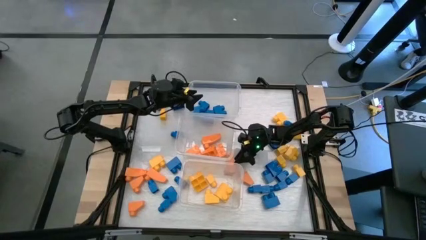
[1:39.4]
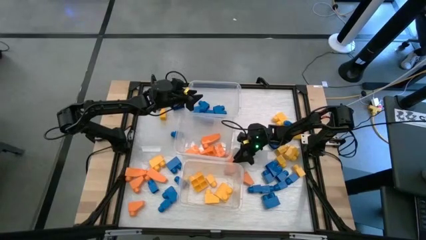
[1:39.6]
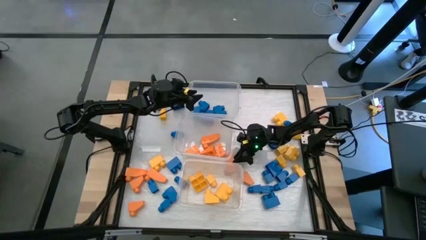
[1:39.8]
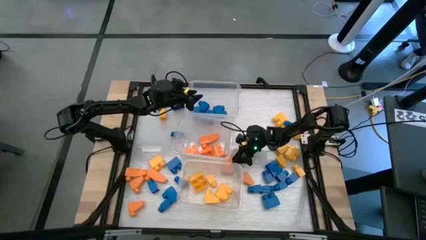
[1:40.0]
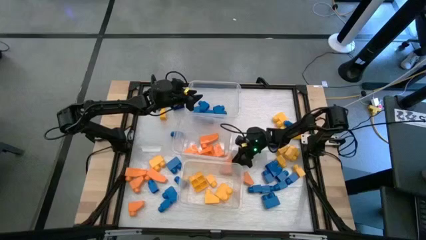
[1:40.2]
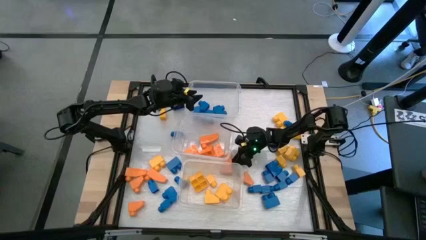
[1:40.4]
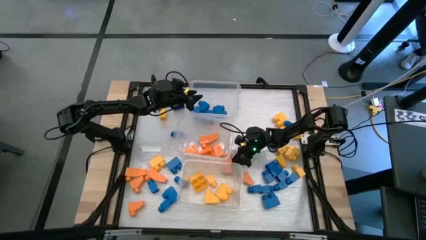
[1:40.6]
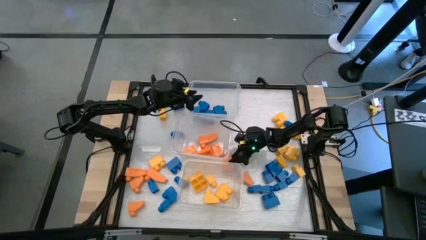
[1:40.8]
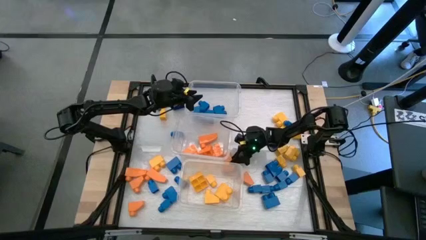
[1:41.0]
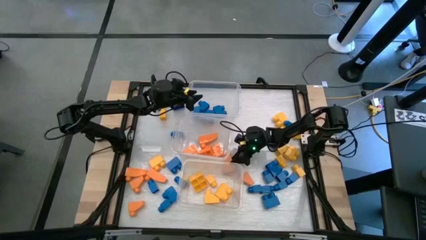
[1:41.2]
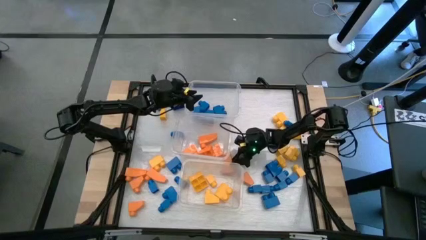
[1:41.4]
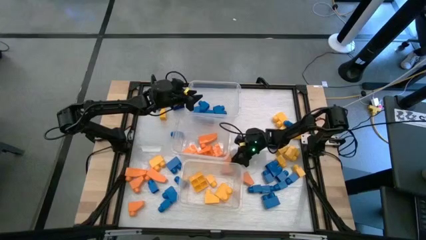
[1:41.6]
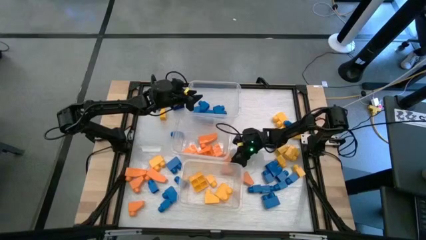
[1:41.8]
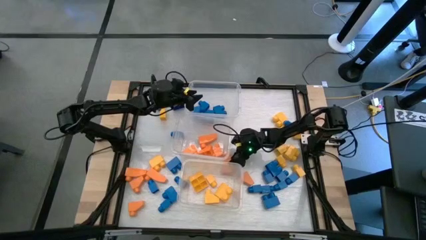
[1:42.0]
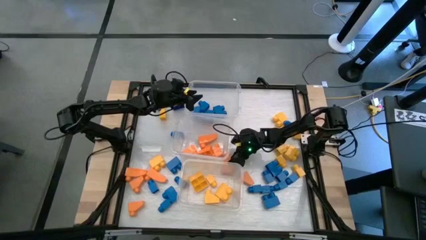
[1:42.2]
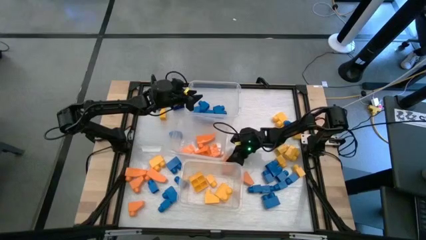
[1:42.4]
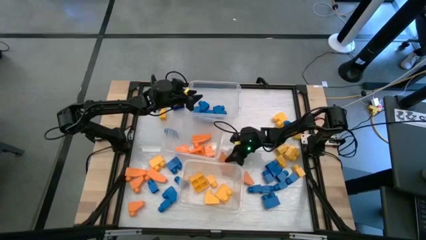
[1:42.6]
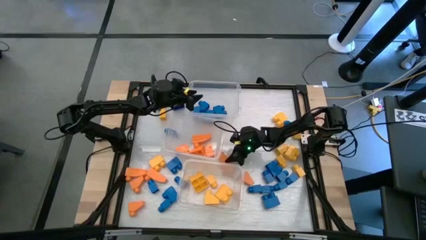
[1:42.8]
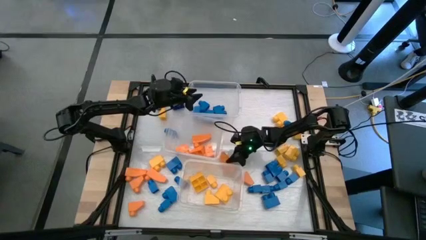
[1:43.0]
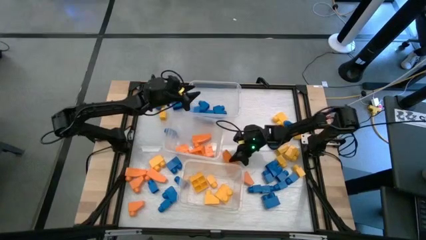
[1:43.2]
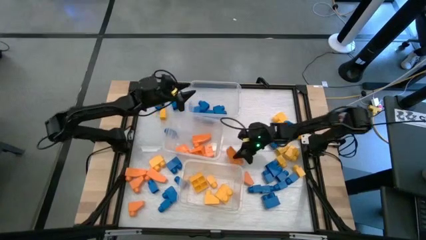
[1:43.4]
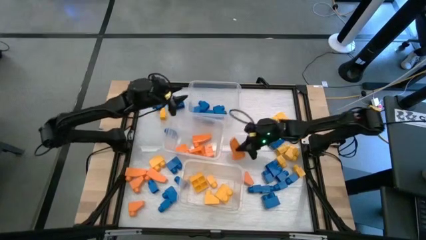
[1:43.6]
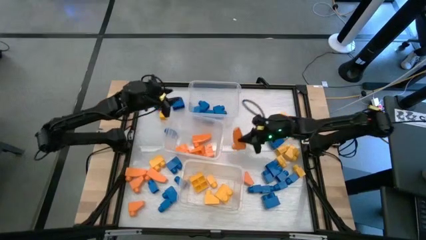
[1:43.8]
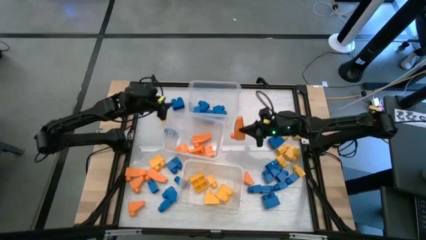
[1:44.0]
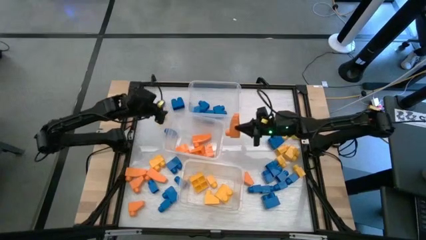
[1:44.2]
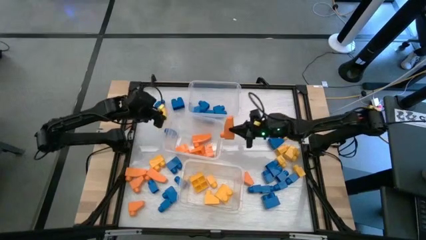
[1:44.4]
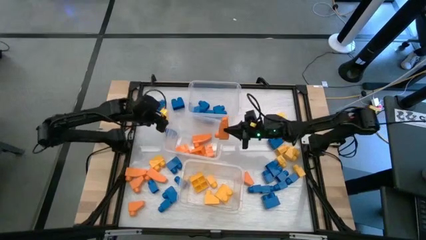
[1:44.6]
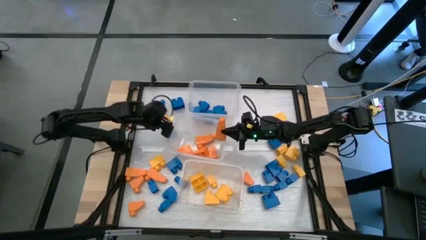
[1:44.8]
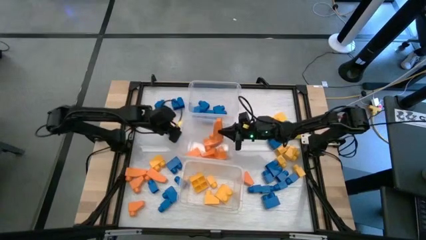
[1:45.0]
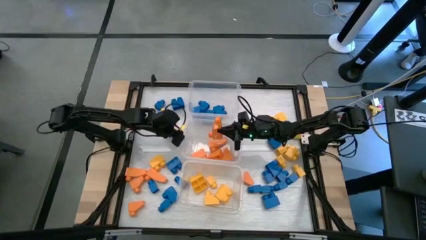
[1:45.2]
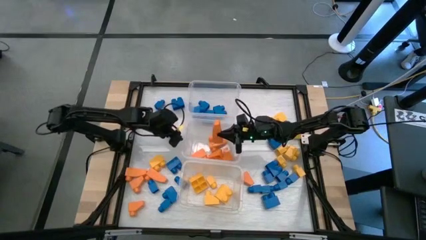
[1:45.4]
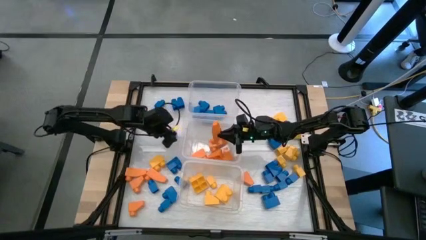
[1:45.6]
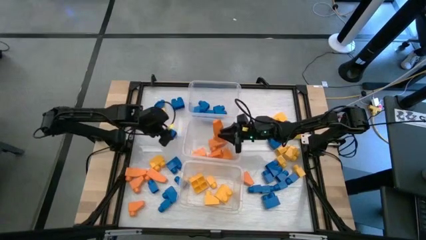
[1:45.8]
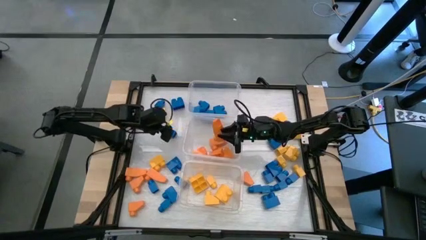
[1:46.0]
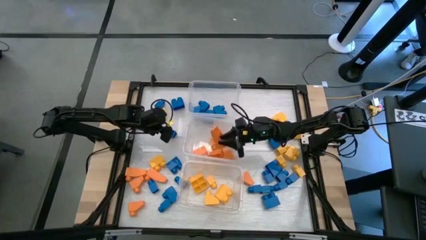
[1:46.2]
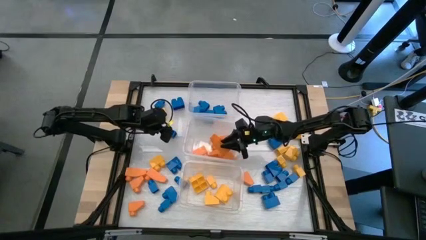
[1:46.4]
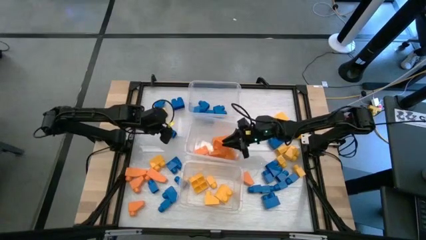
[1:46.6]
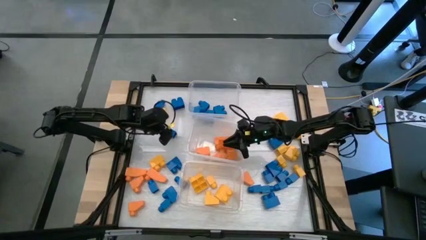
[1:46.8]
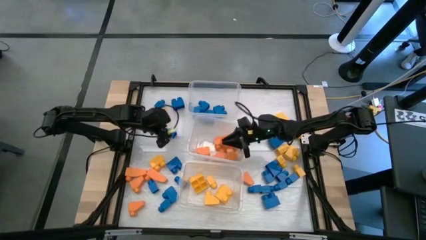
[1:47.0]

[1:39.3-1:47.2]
Task: Sort blocks
Put the orange game piece into the middle transparent bin

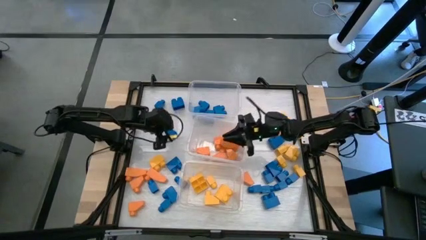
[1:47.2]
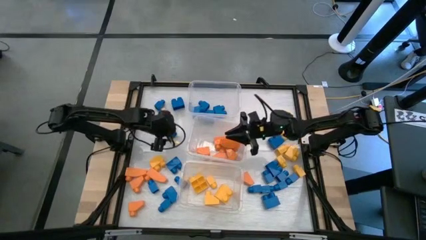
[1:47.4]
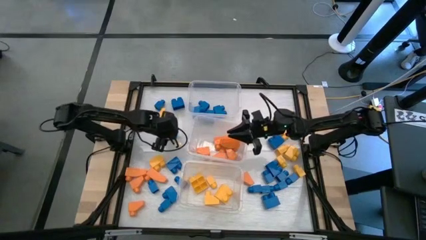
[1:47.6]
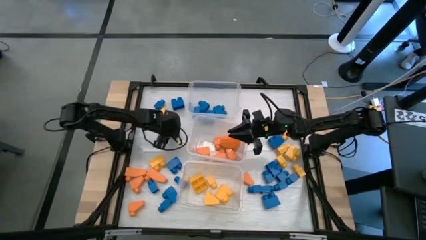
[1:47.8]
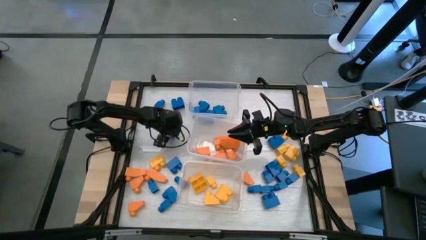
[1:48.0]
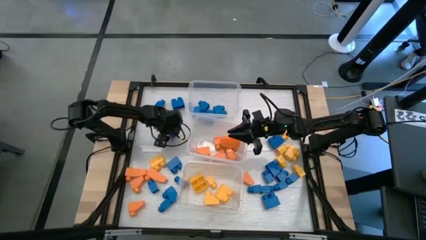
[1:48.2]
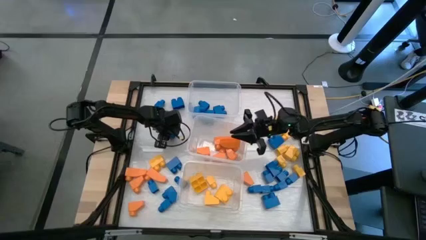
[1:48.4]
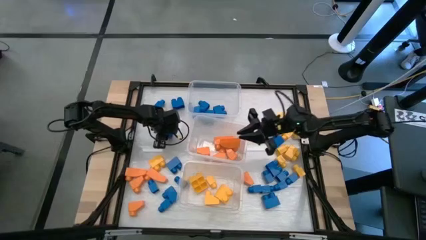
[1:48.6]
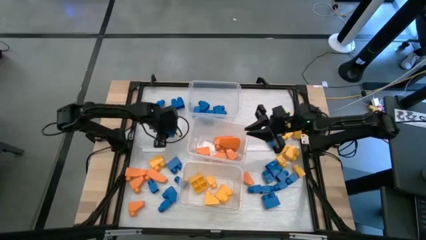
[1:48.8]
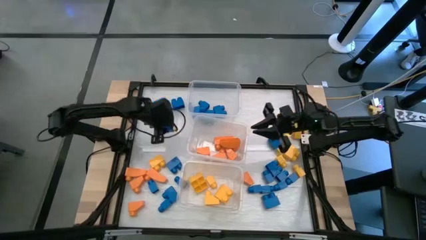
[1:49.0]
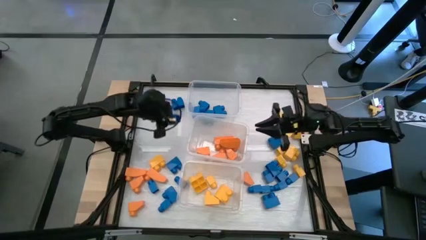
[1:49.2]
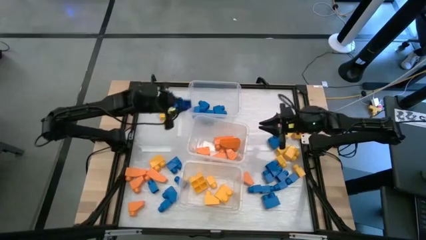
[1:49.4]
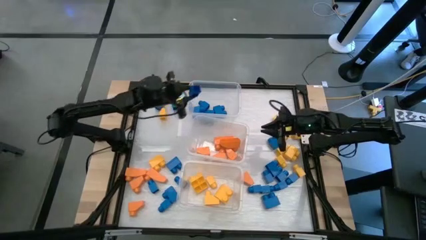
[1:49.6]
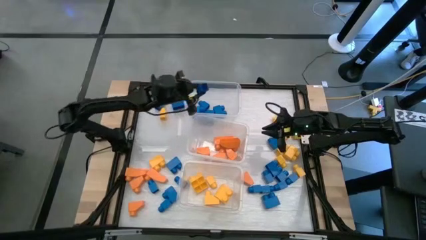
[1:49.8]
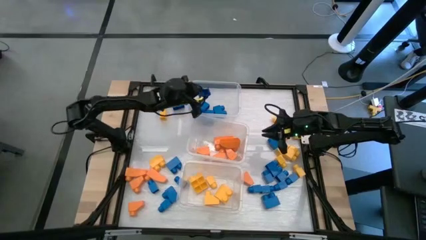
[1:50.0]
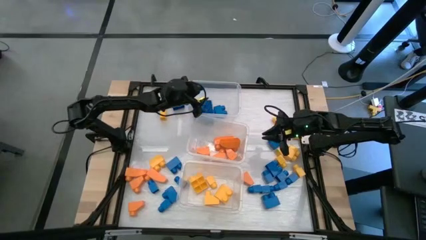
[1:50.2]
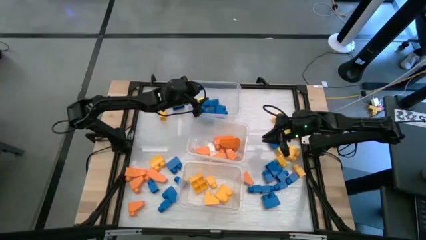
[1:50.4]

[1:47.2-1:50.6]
Put the blue game piece into the top transparent bin

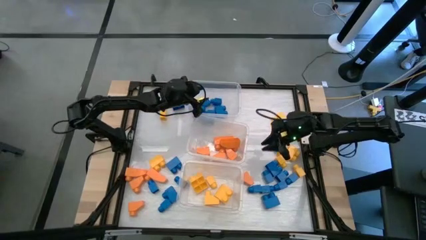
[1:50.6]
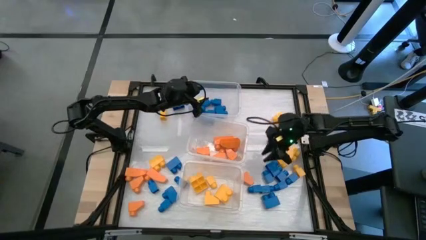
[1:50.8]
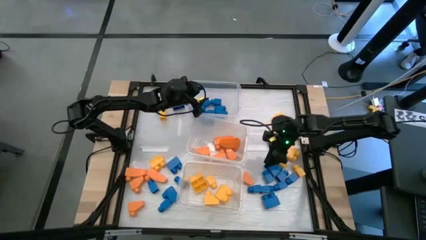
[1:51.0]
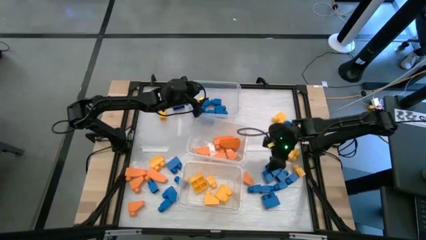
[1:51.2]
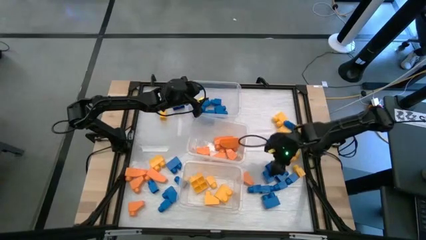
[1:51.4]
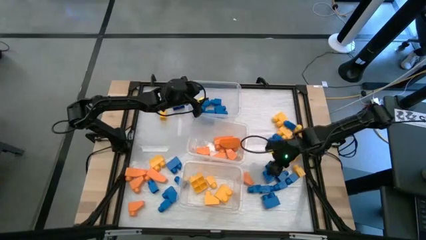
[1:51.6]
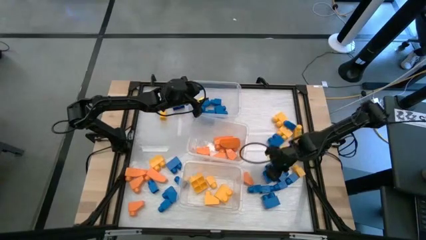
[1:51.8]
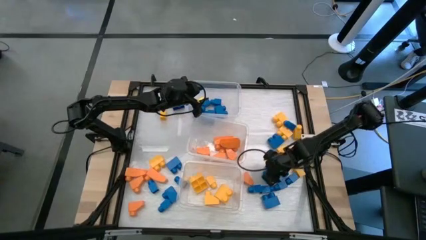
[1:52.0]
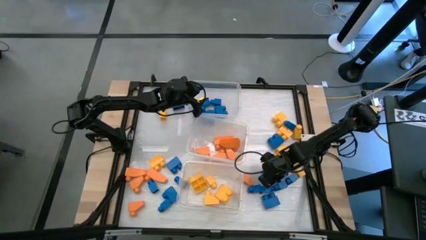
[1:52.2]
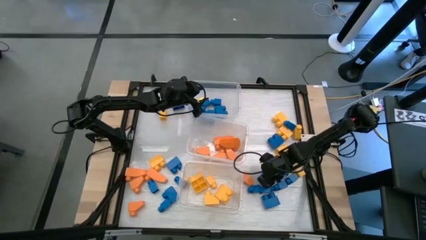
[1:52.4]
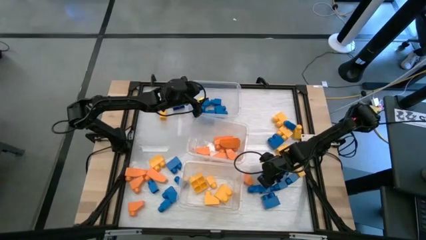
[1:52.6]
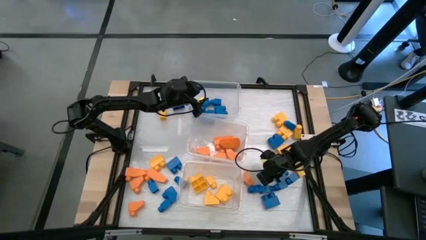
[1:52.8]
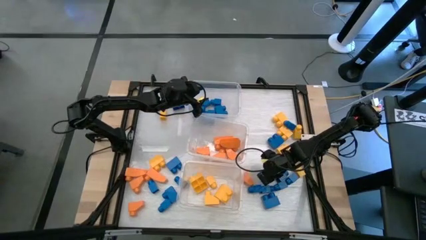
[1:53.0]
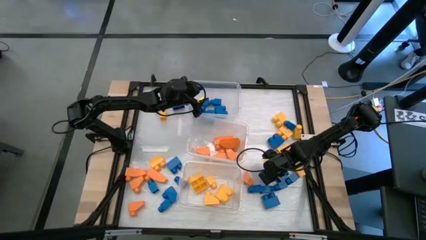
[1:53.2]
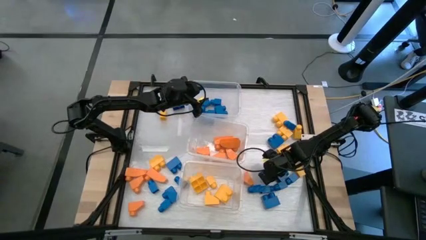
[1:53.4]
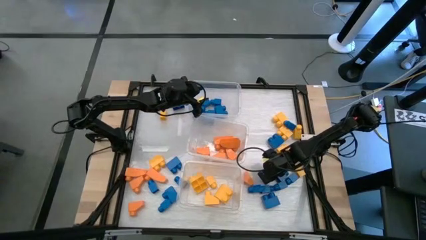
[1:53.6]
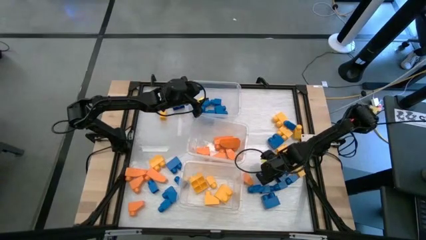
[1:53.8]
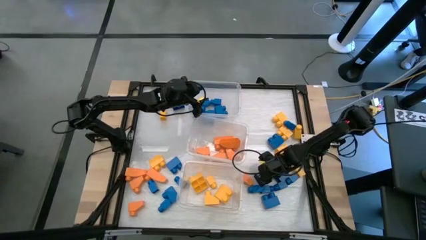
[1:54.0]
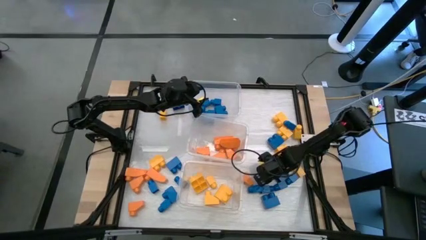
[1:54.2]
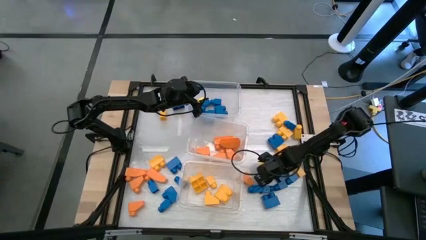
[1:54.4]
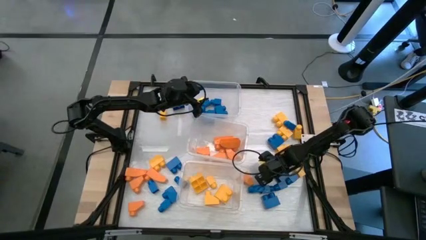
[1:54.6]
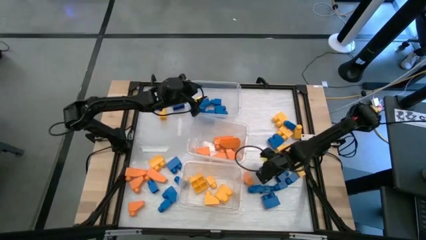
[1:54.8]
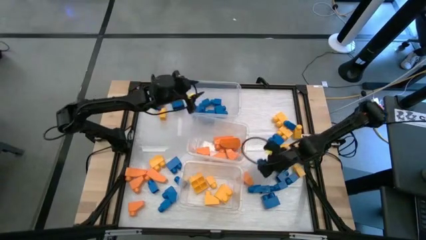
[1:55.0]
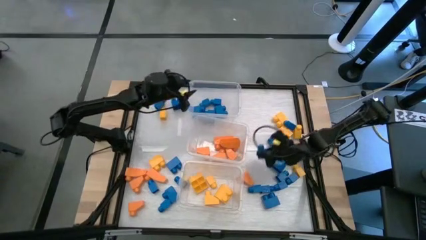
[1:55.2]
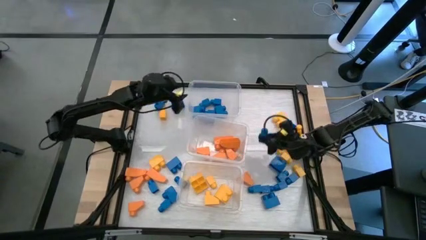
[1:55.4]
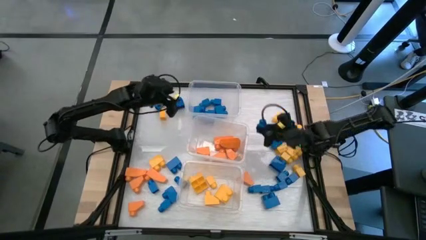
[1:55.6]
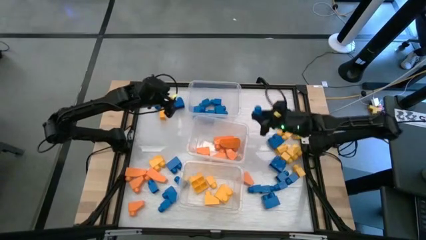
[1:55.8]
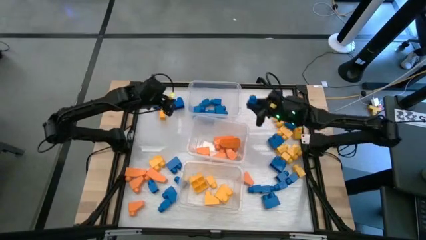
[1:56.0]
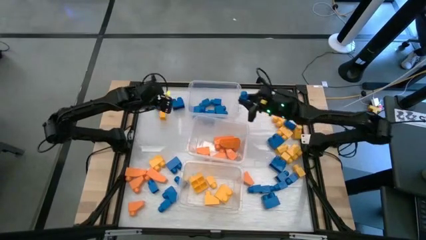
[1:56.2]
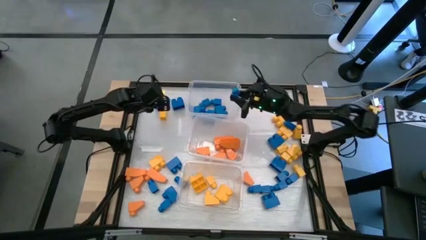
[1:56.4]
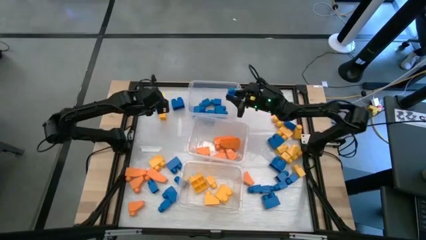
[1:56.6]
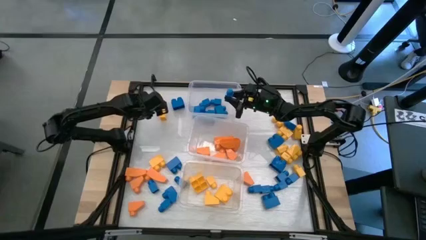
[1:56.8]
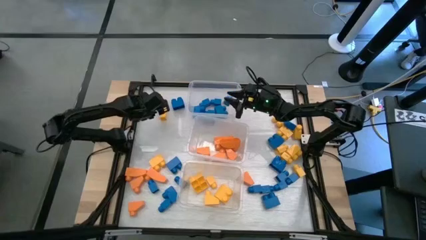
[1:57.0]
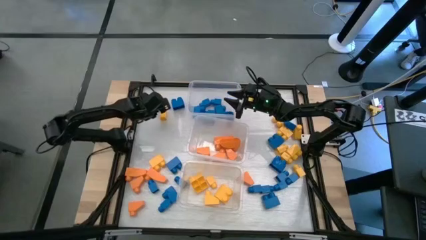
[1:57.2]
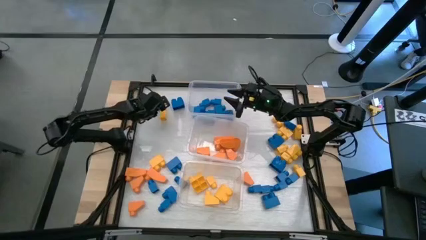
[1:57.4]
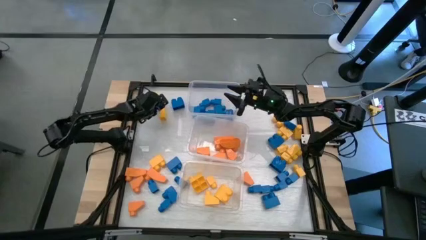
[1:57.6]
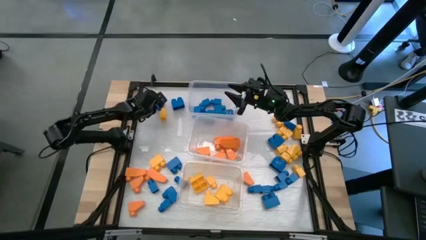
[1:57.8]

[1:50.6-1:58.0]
Put the blue game piece into the top transparent bin
